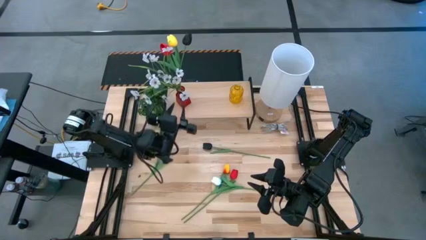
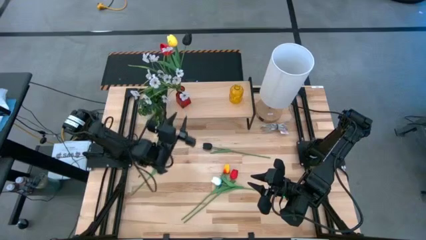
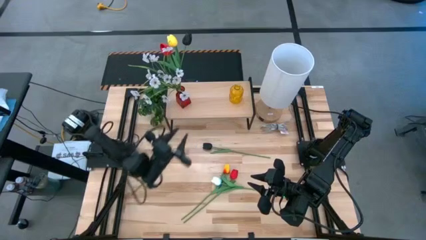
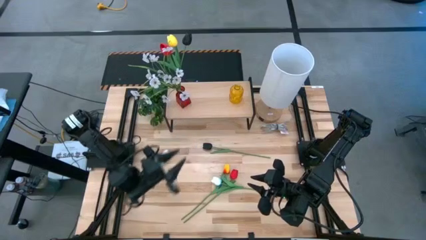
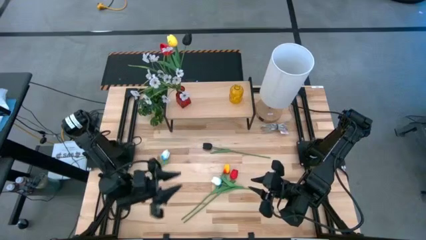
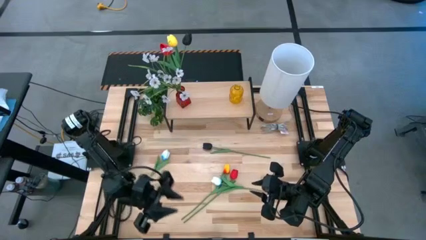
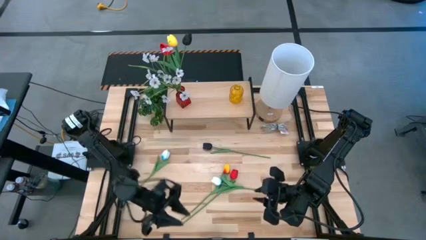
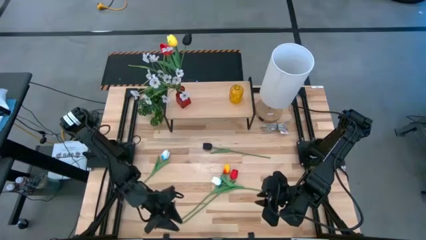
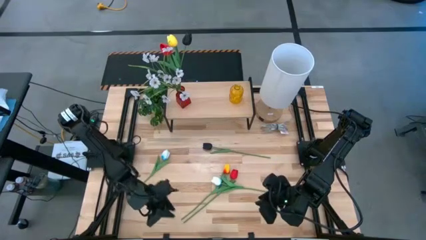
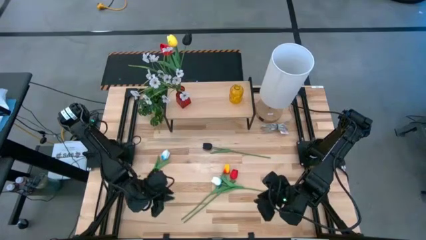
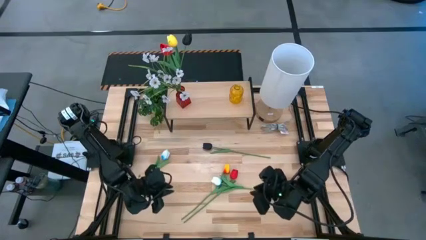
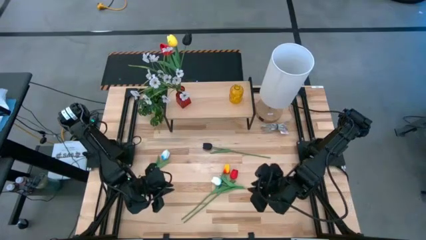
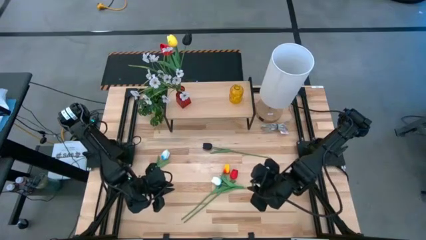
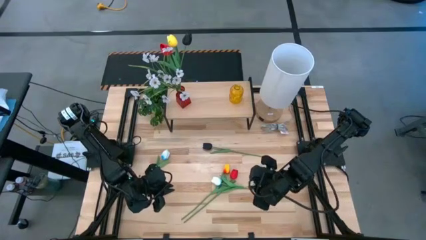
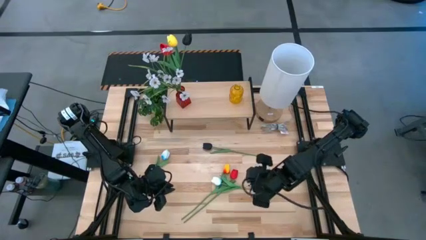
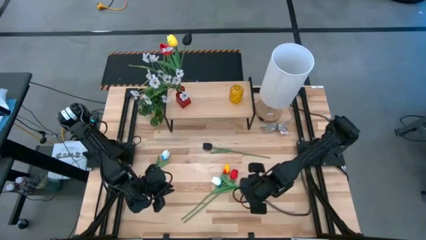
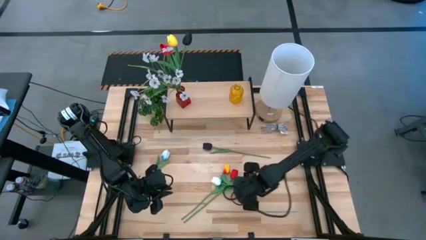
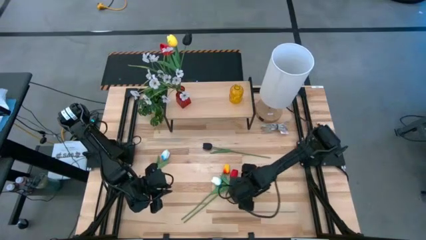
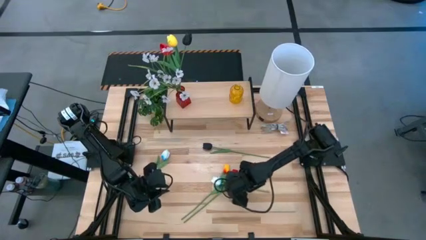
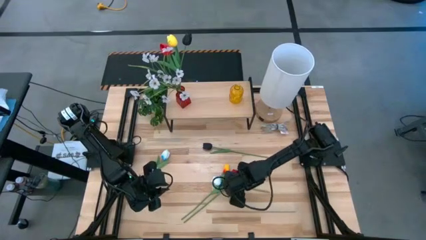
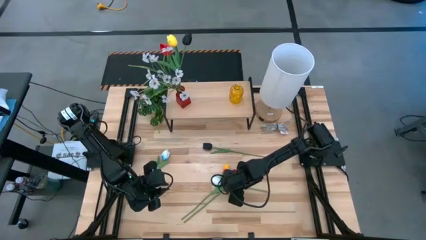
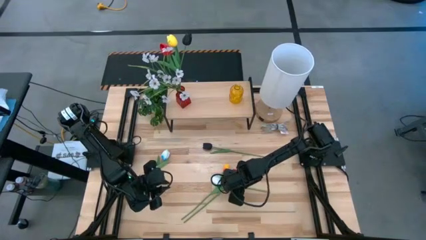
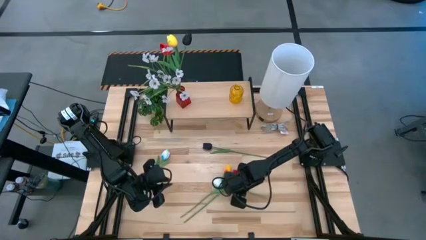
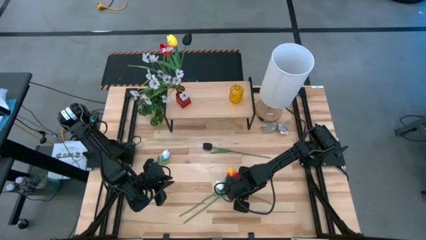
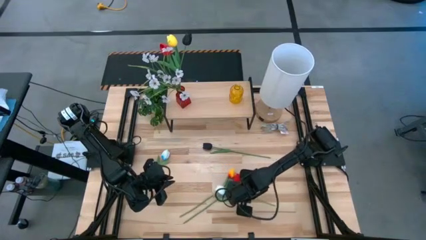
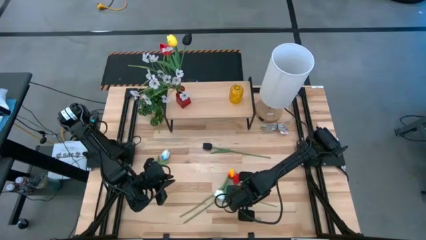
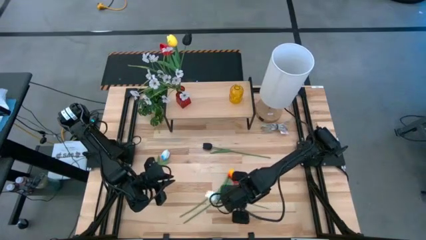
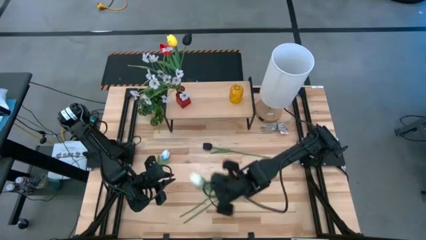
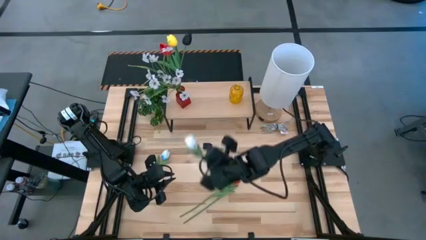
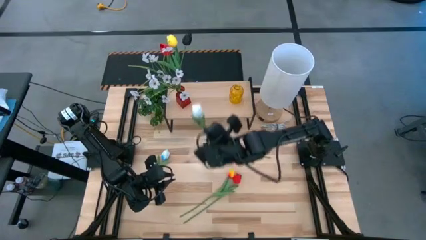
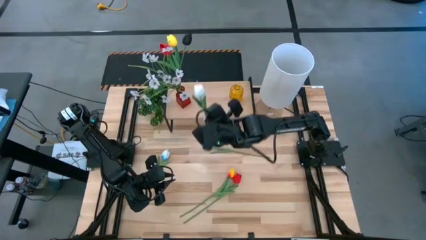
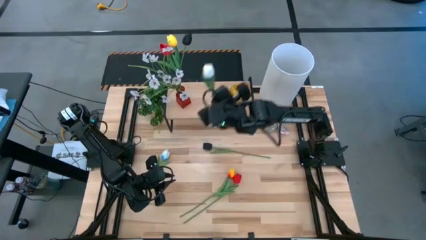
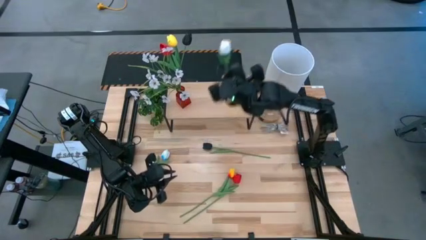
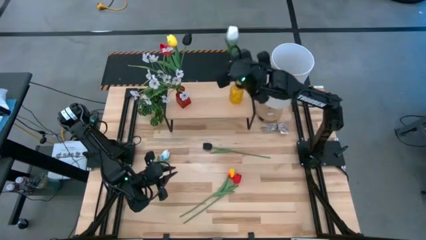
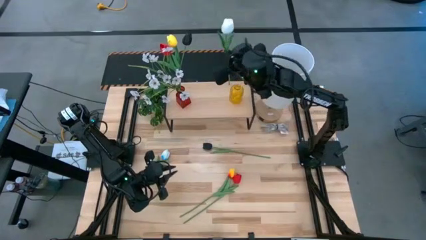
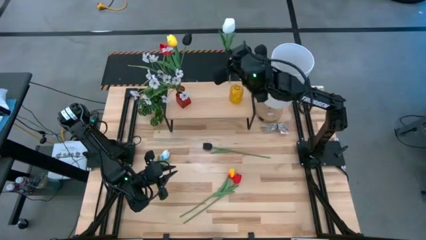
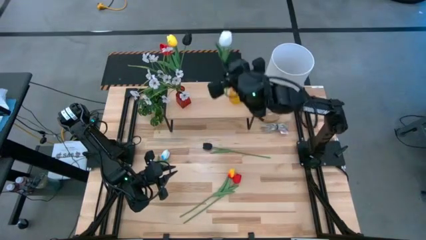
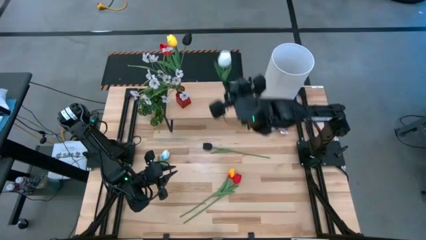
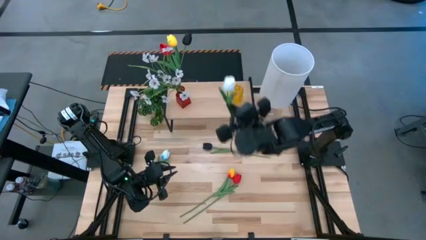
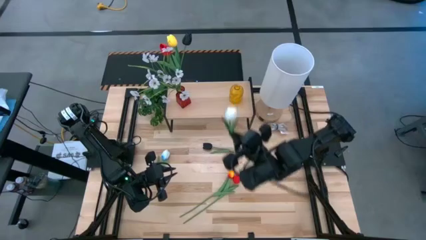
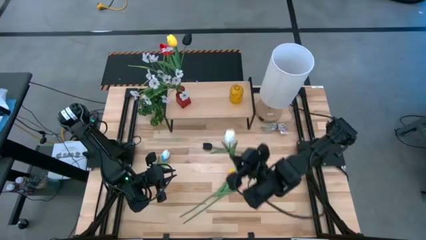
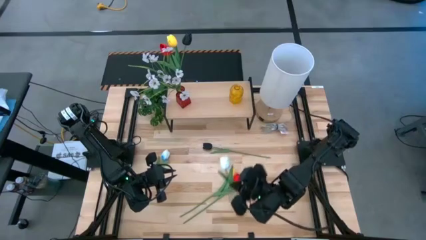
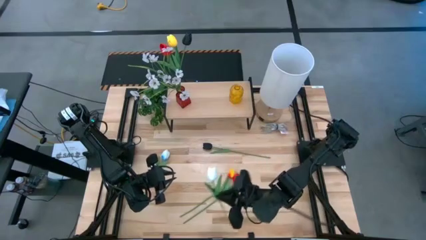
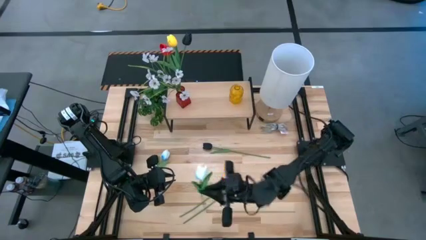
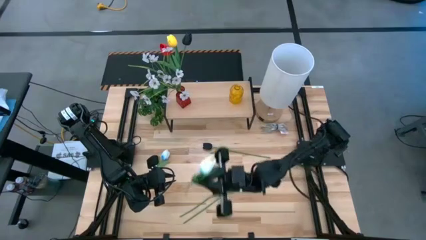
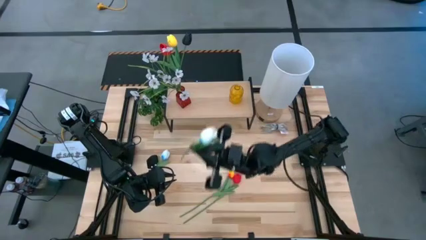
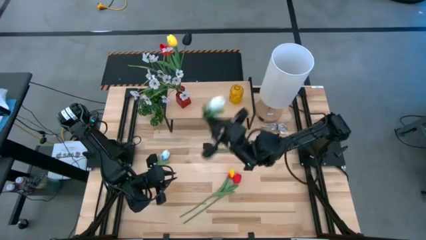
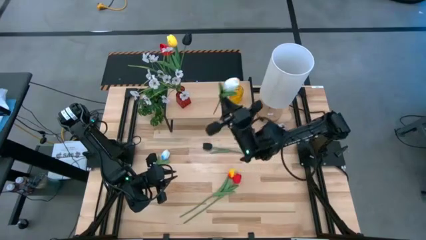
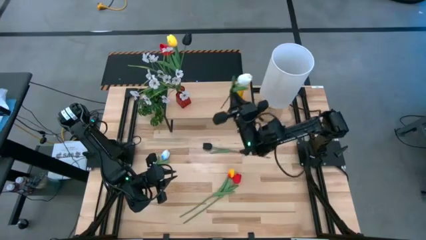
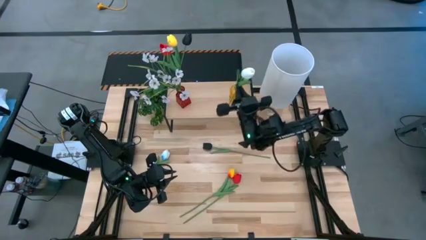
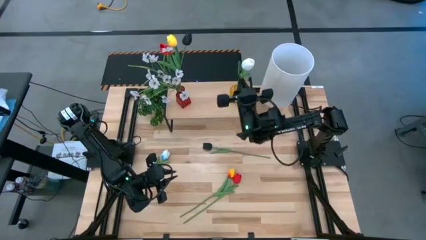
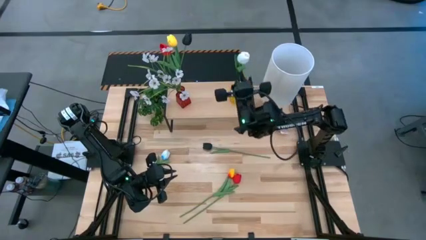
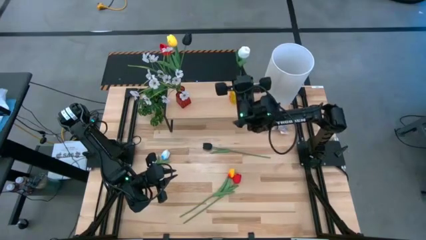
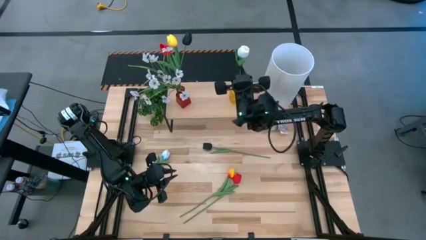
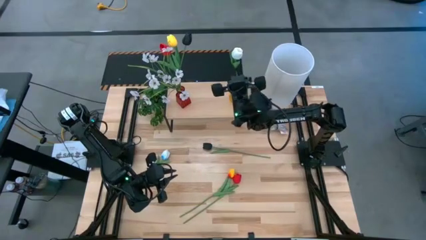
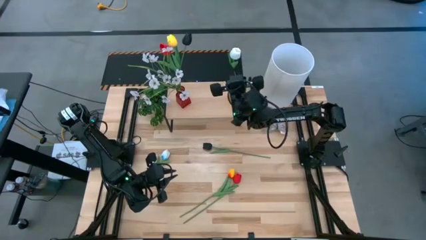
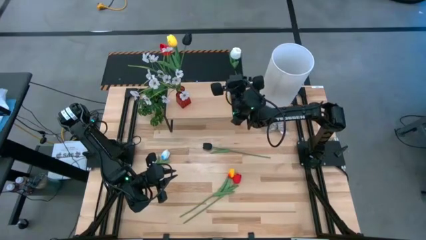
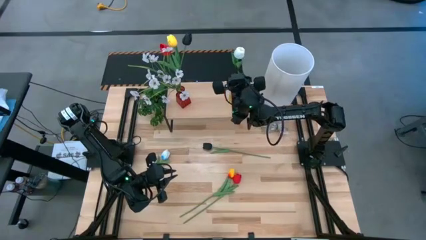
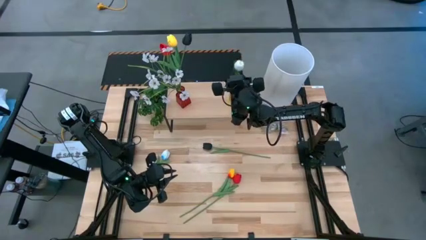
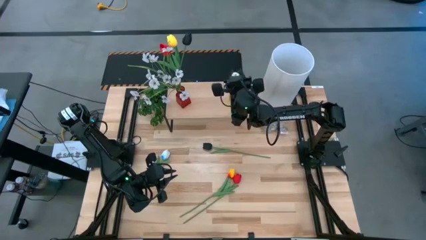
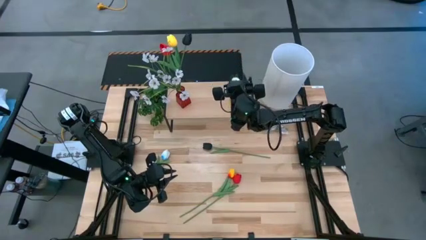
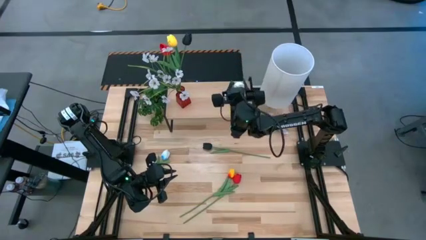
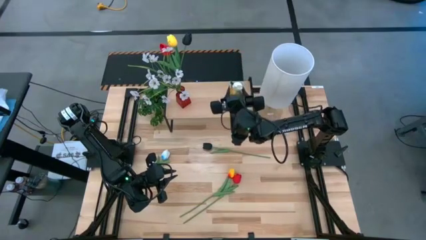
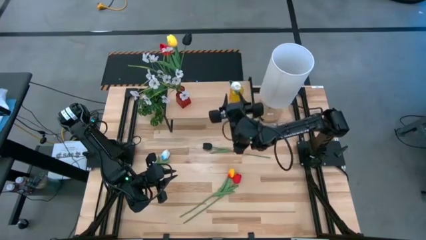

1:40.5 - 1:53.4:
Task: Pick and place flowers into a vace then onto a shelf
Put the right white flower into the yellow vase on the shelf
